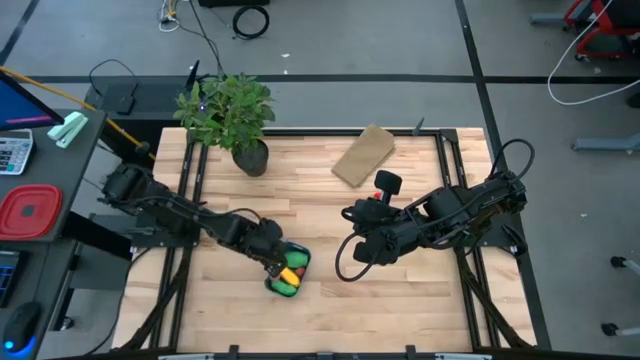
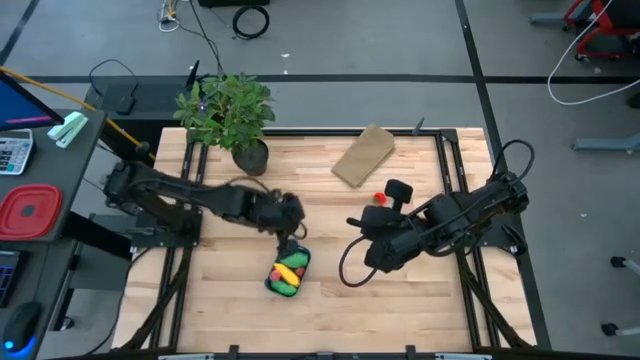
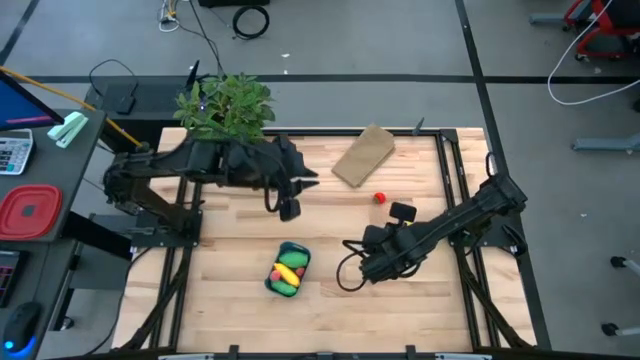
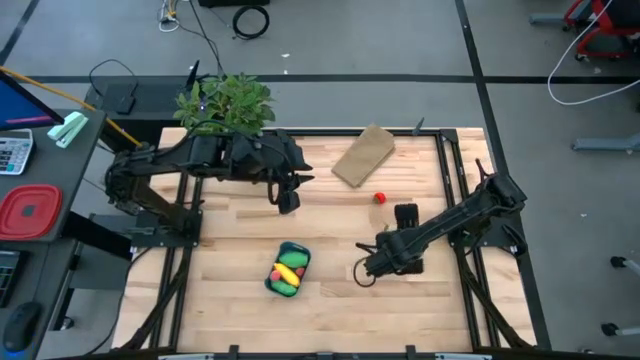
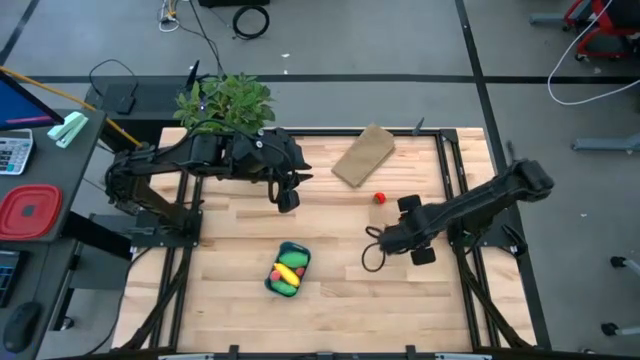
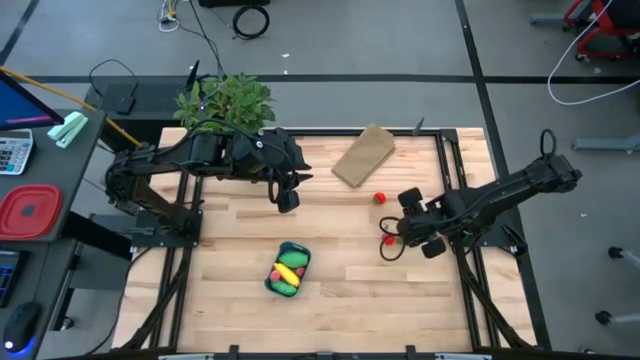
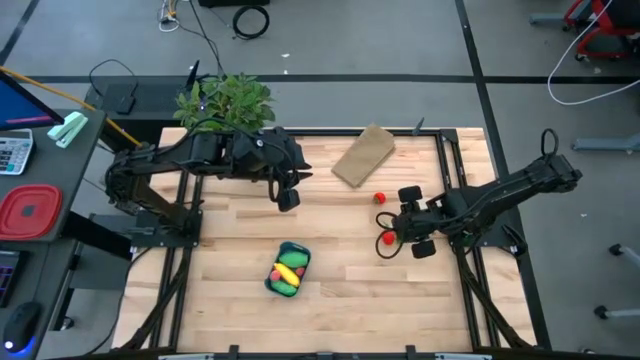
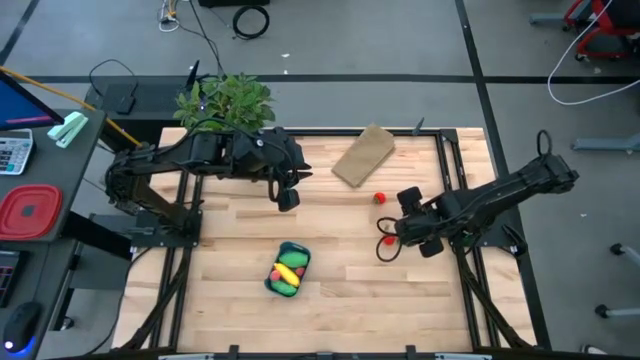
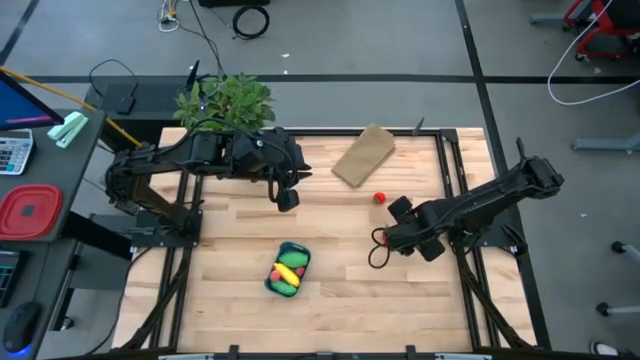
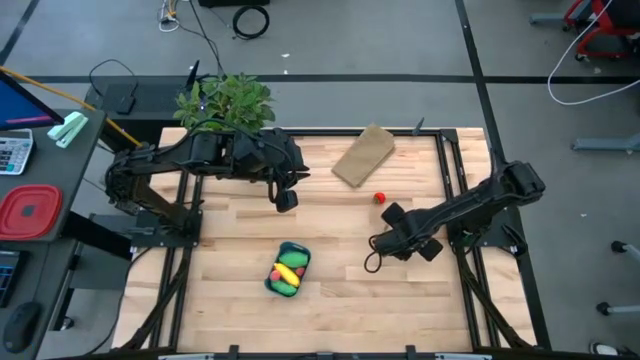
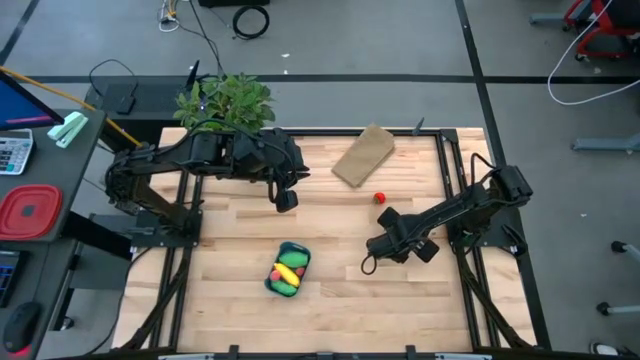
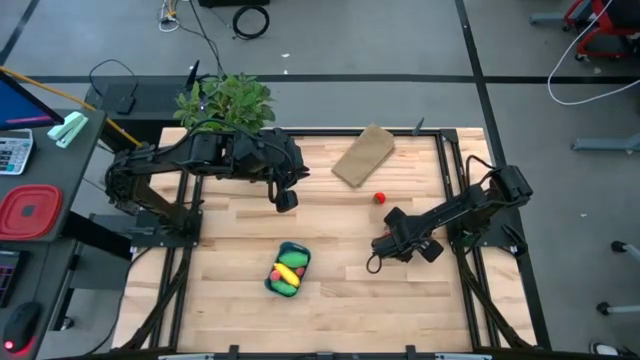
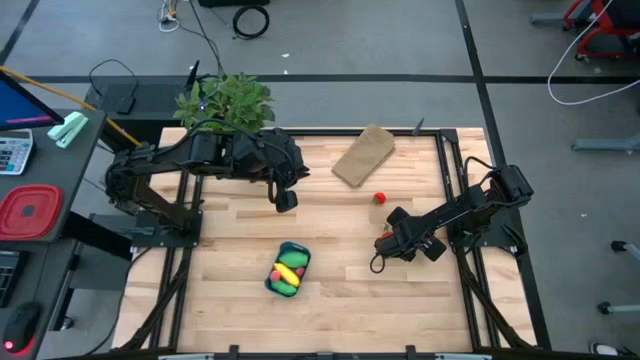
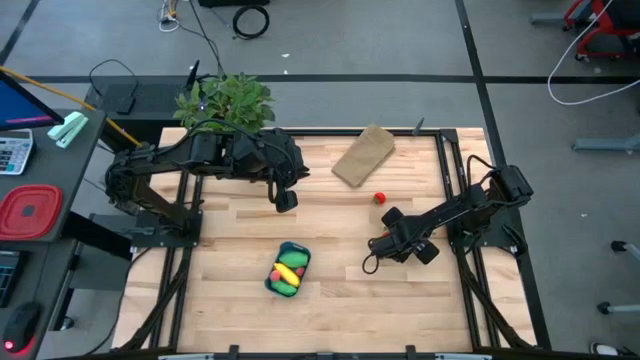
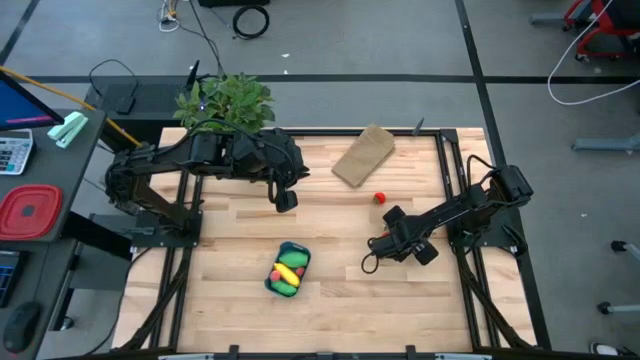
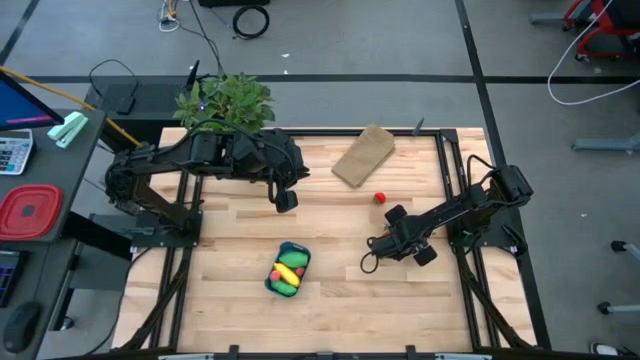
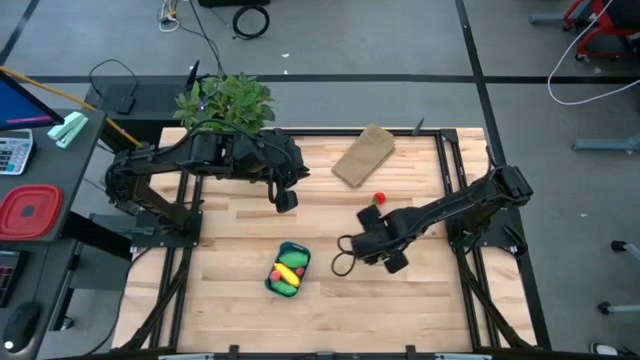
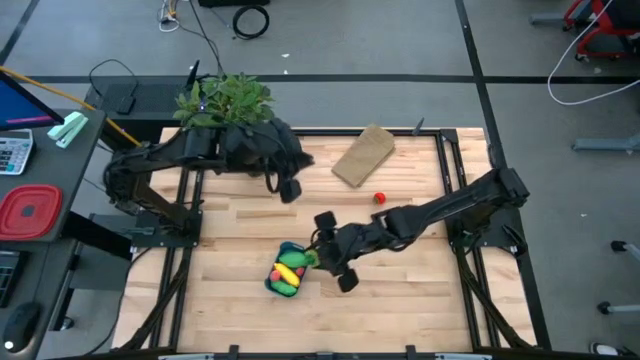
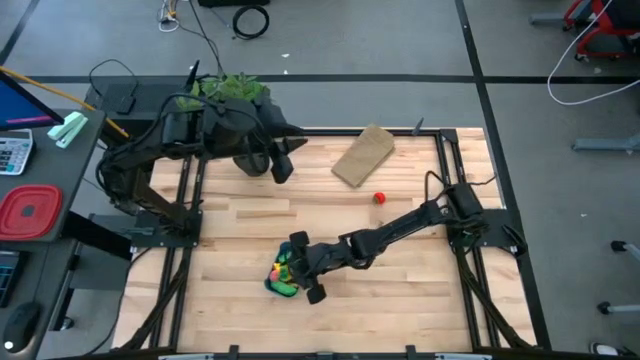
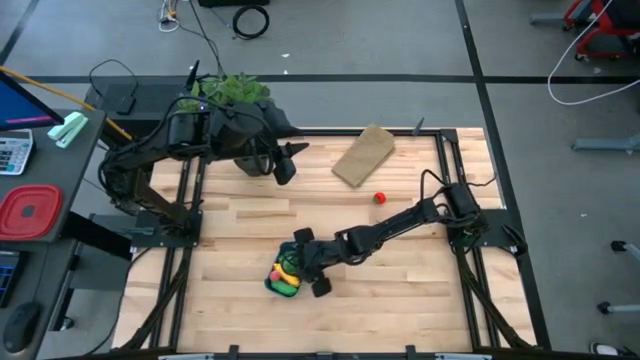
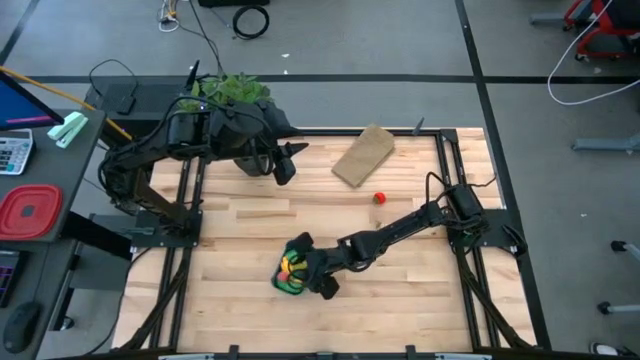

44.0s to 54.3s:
Task: Pick and placing Produce into tupperware
Put the yellow pineapple into the blue bin

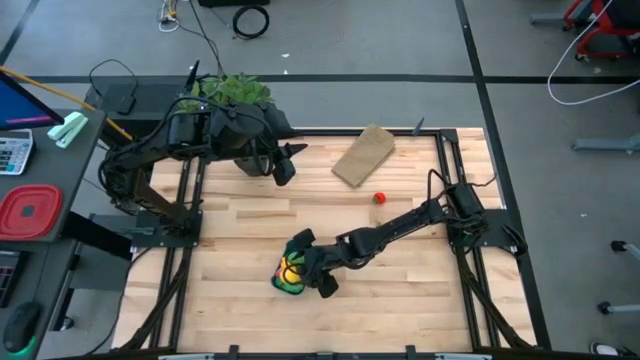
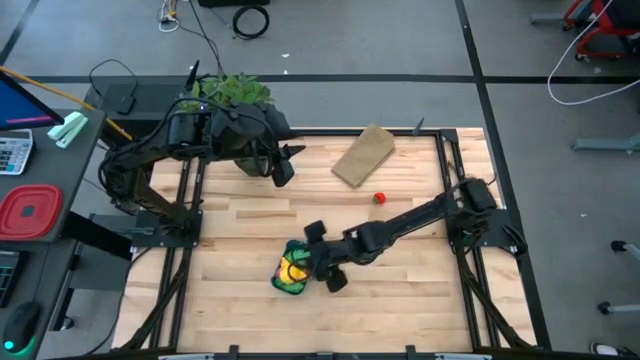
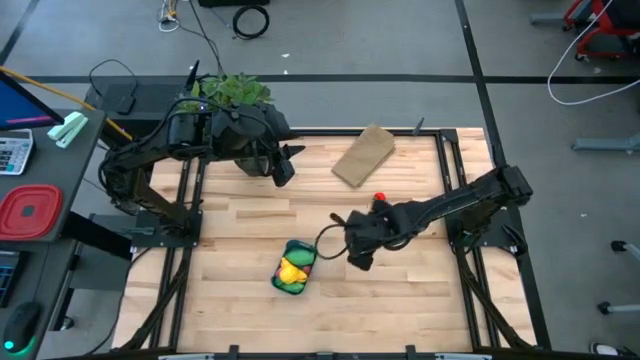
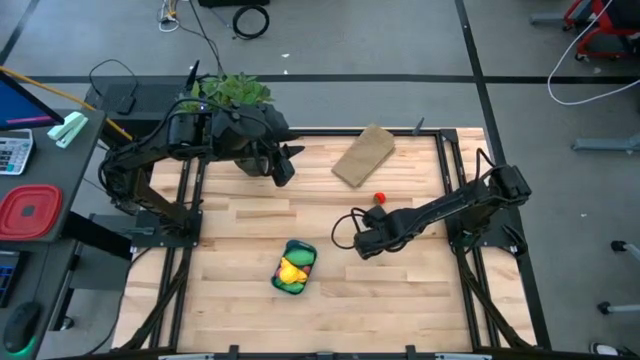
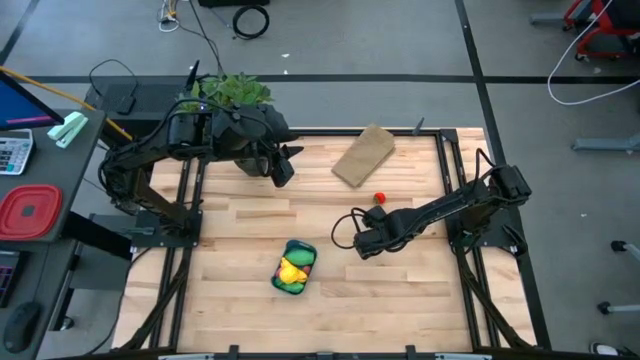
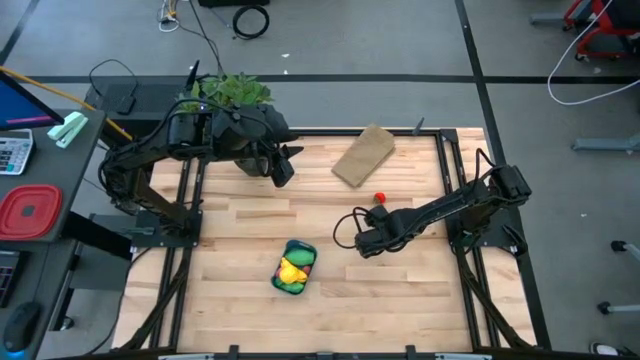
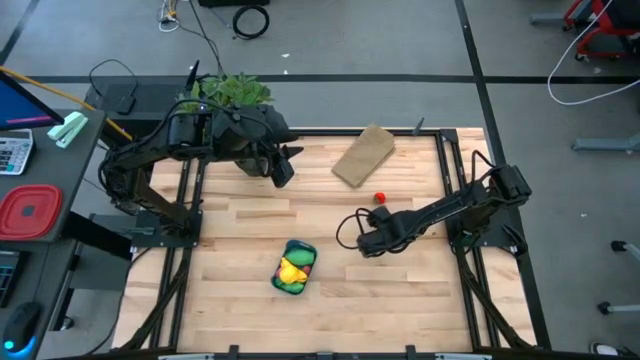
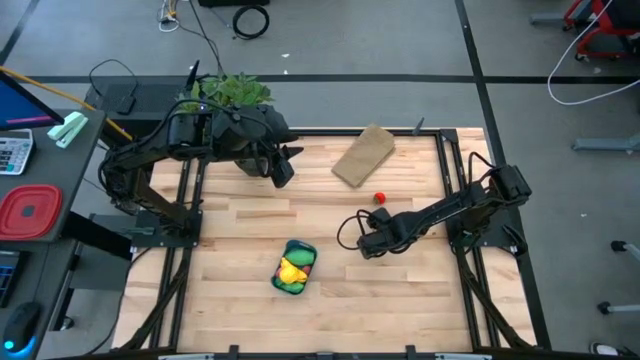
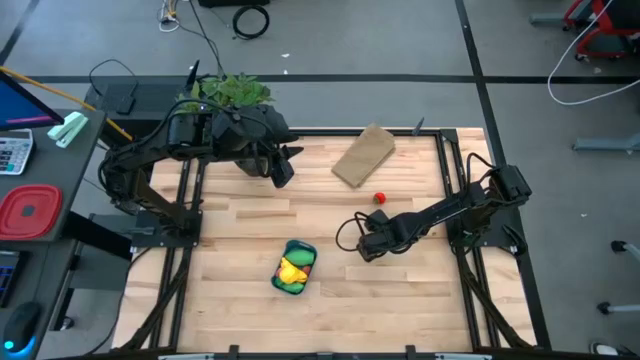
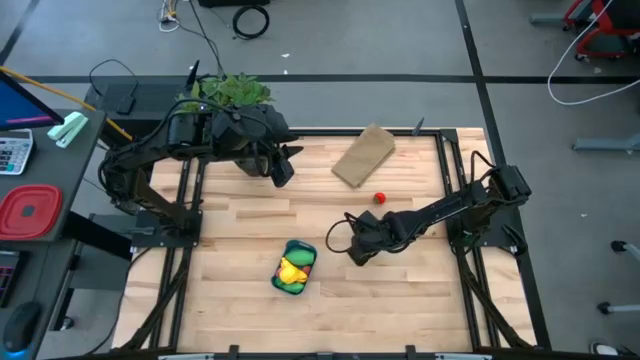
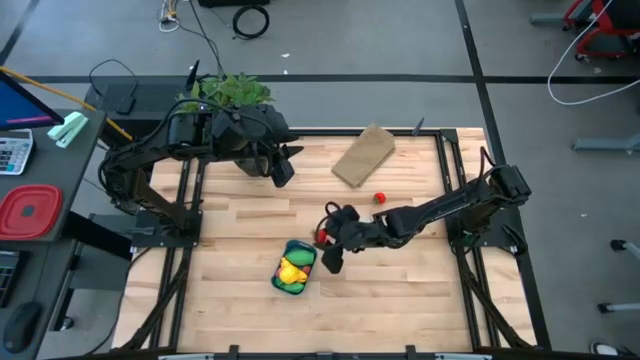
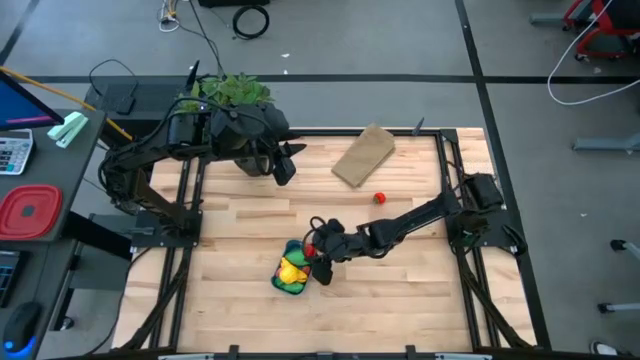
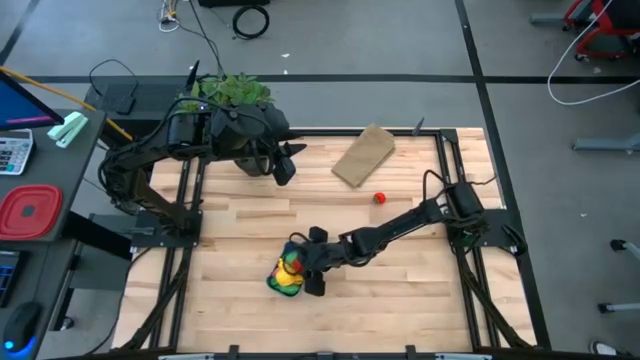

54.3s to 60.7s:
Put the bottom red strawberry into the blue bin

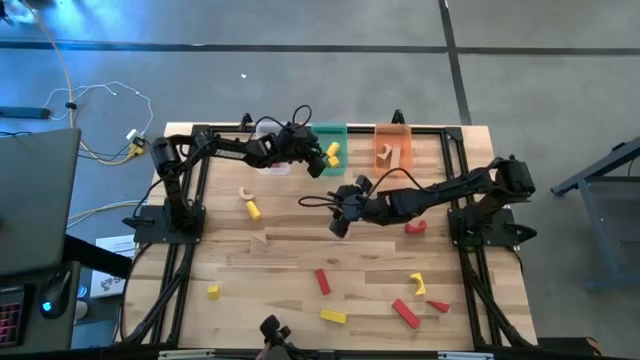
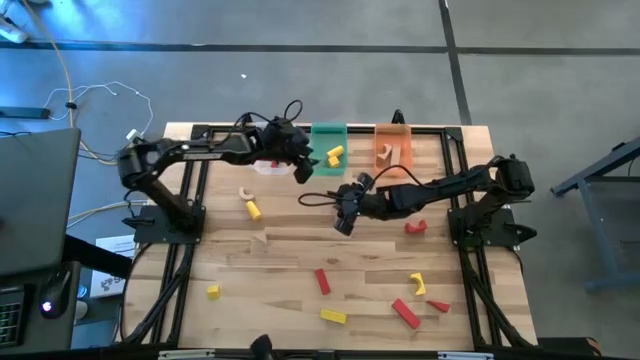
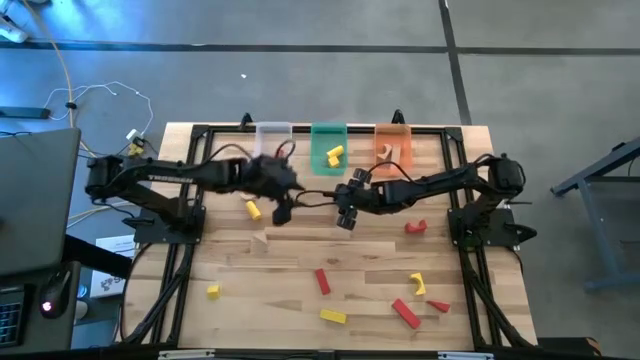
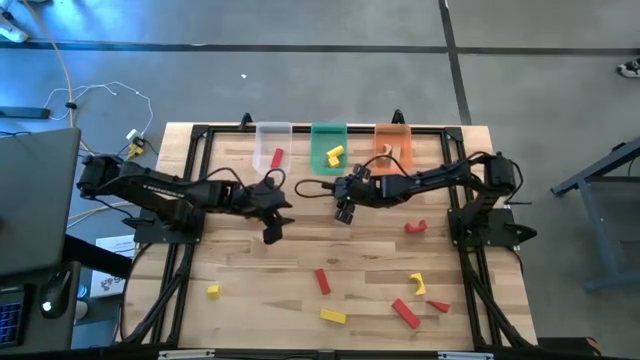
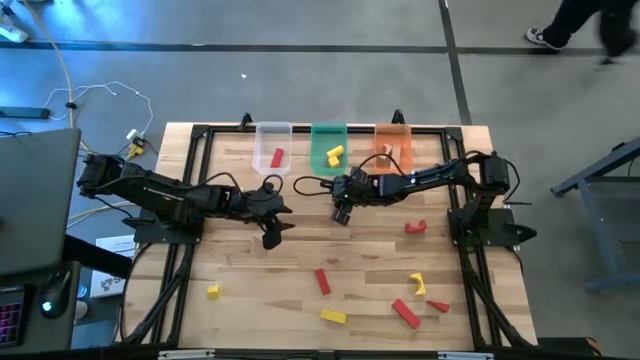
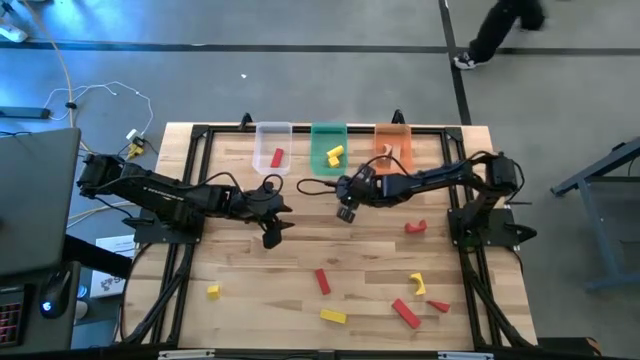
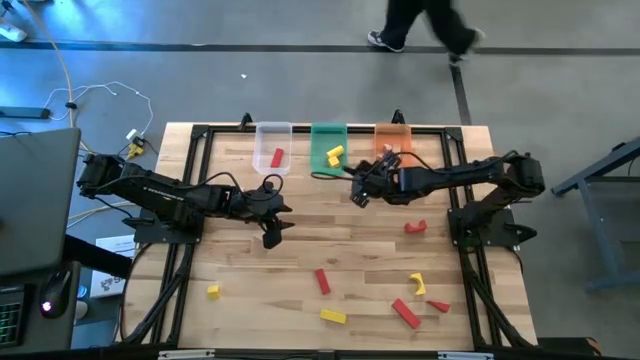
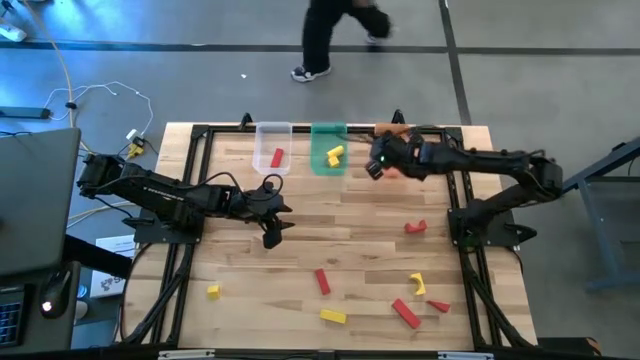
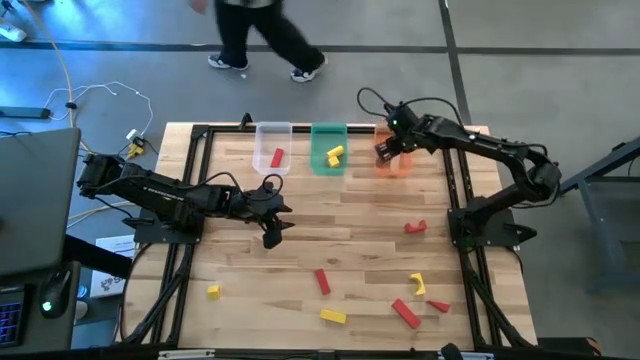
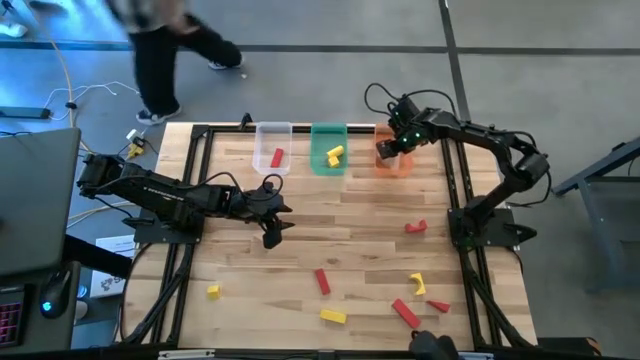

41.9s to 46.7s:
Task: Sort & place blocks by color
Put the brown block into the orange bin
